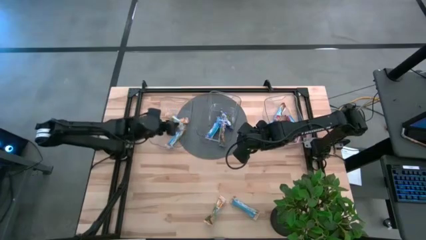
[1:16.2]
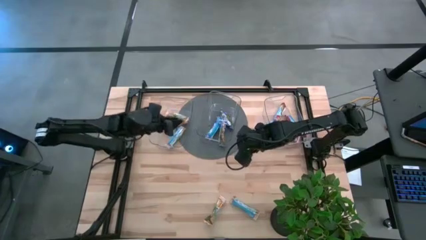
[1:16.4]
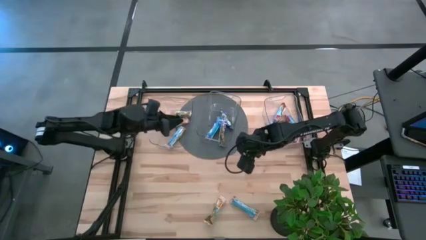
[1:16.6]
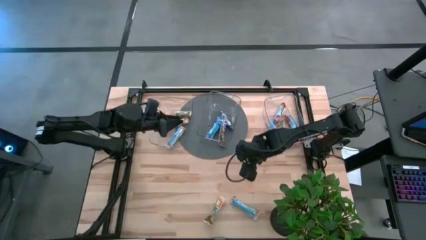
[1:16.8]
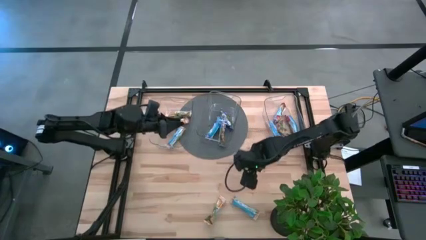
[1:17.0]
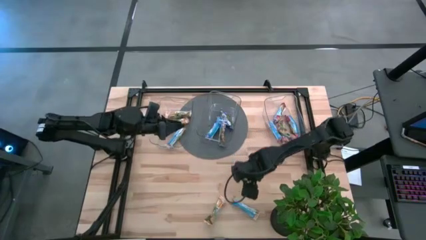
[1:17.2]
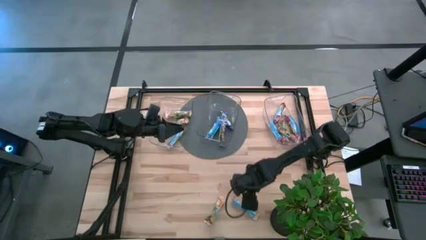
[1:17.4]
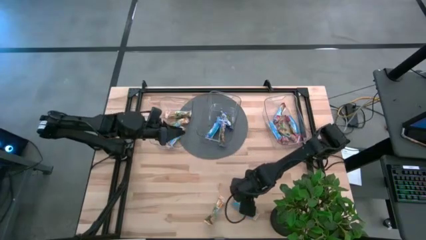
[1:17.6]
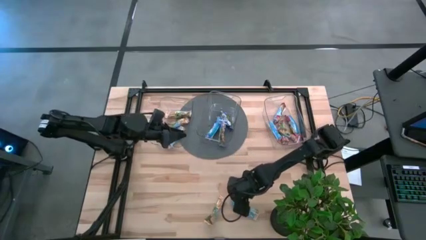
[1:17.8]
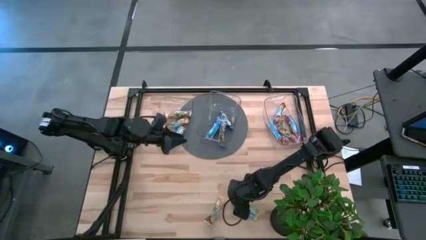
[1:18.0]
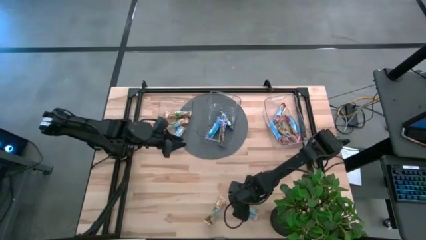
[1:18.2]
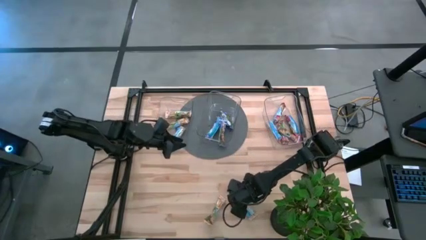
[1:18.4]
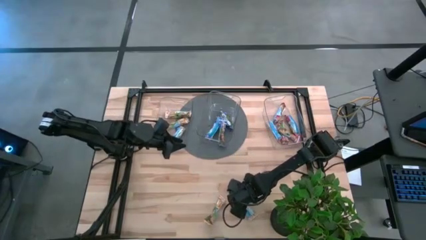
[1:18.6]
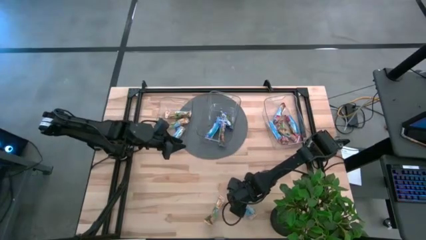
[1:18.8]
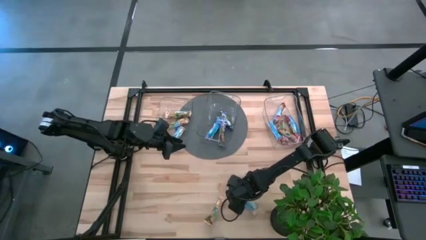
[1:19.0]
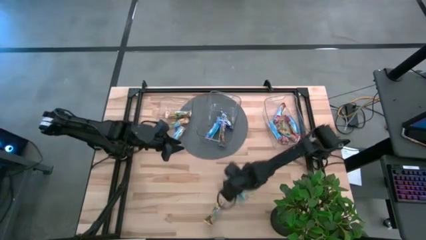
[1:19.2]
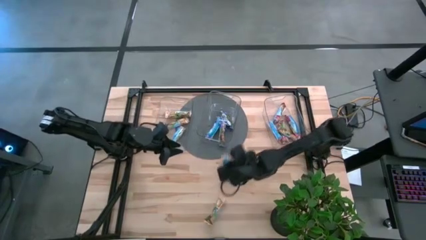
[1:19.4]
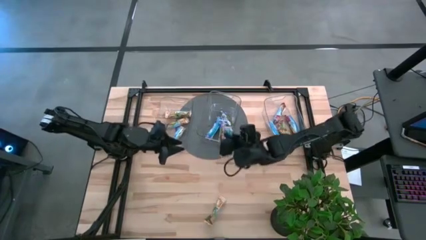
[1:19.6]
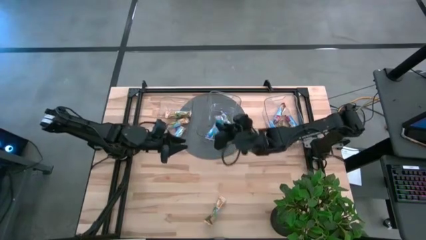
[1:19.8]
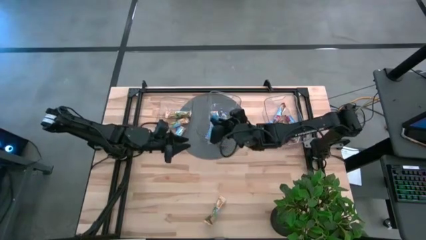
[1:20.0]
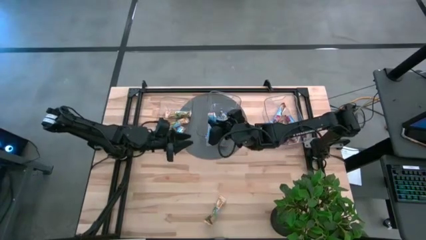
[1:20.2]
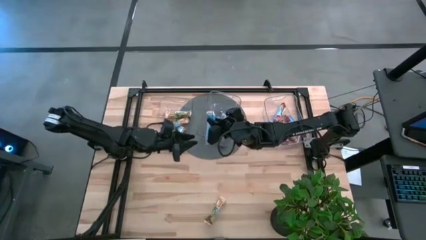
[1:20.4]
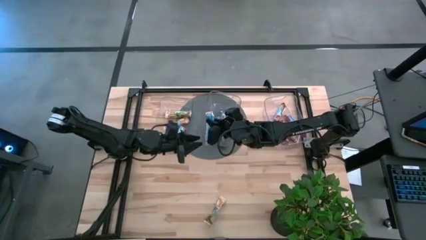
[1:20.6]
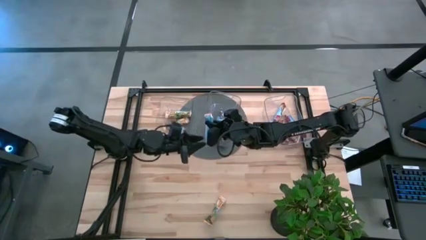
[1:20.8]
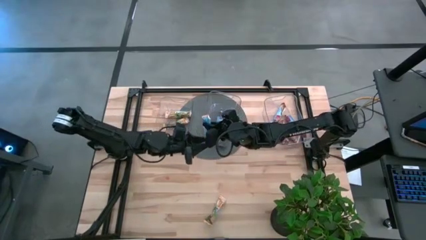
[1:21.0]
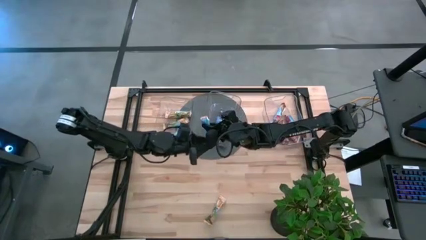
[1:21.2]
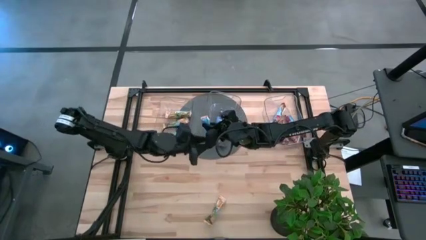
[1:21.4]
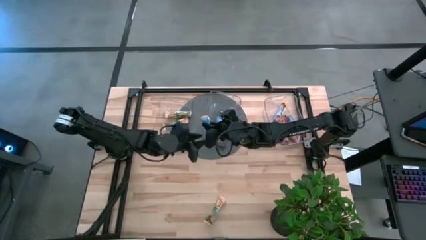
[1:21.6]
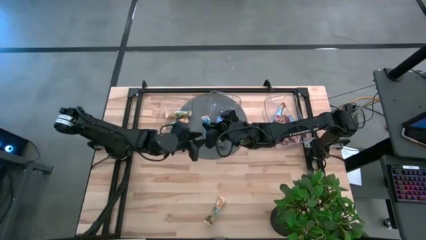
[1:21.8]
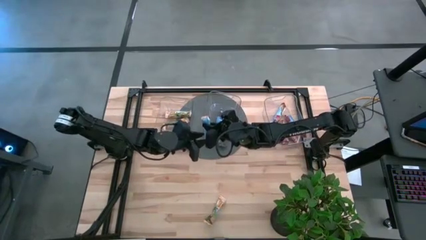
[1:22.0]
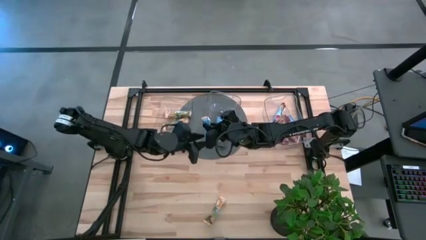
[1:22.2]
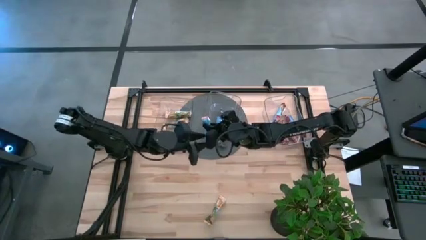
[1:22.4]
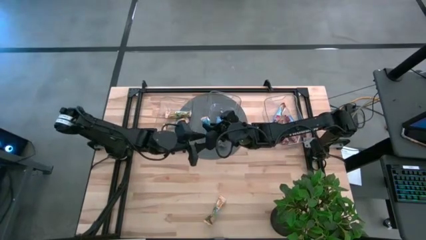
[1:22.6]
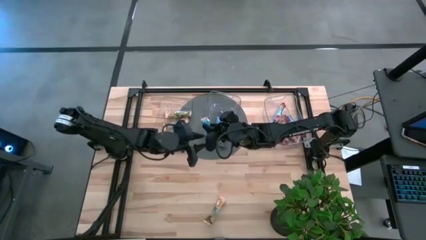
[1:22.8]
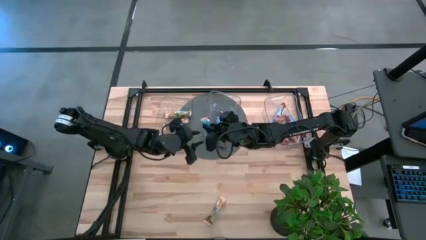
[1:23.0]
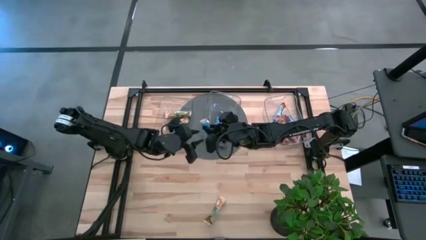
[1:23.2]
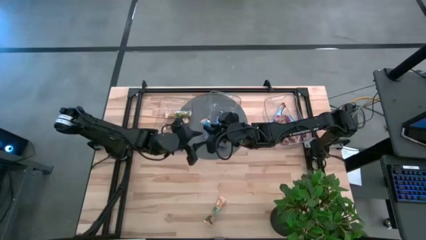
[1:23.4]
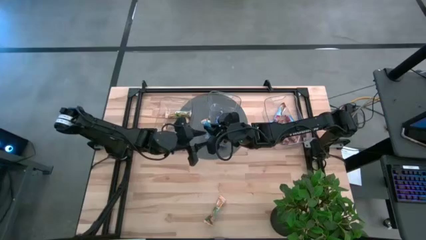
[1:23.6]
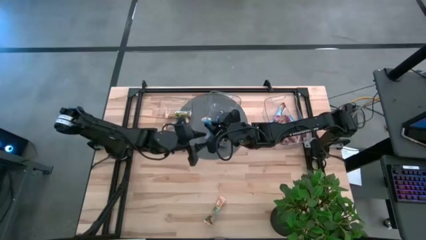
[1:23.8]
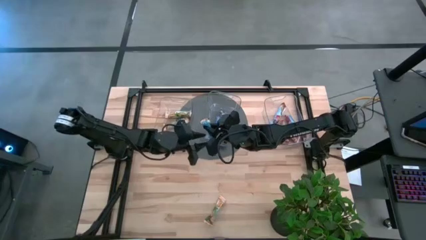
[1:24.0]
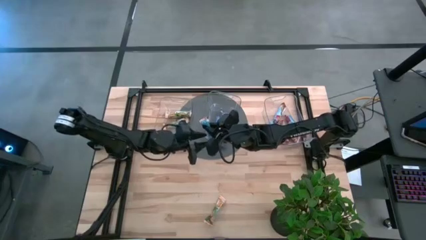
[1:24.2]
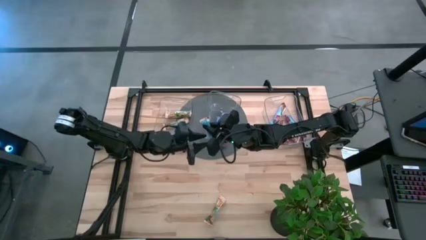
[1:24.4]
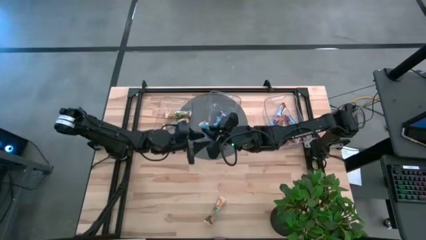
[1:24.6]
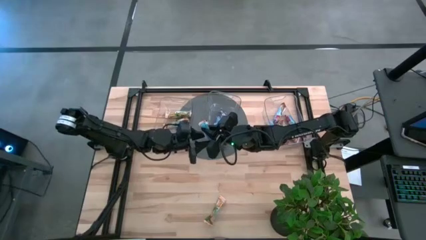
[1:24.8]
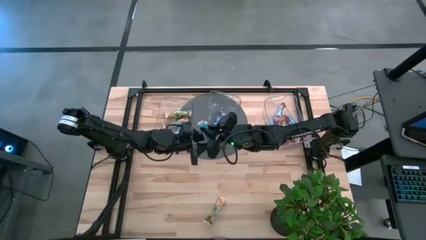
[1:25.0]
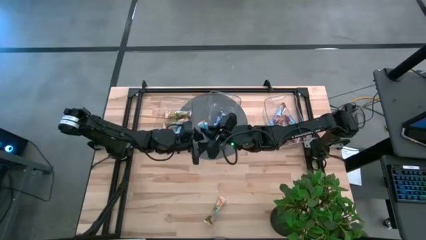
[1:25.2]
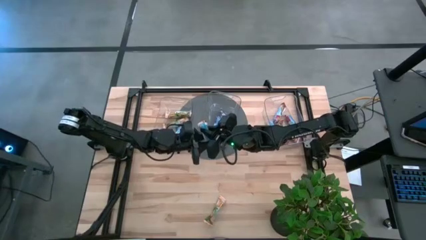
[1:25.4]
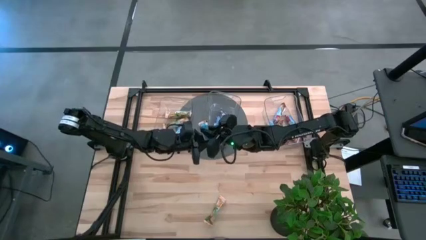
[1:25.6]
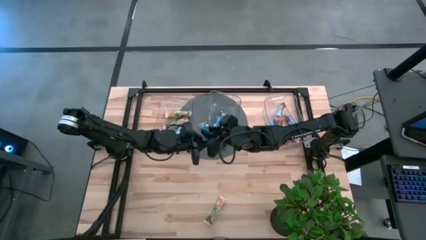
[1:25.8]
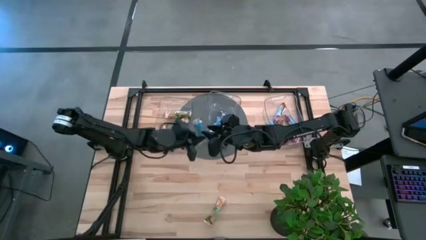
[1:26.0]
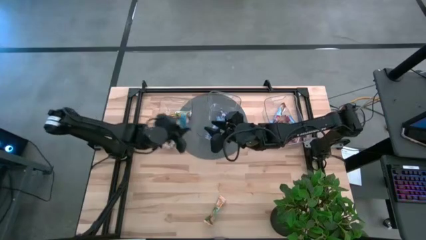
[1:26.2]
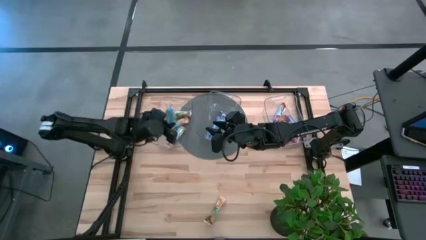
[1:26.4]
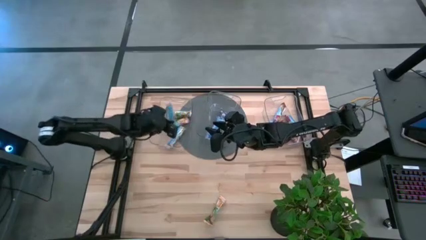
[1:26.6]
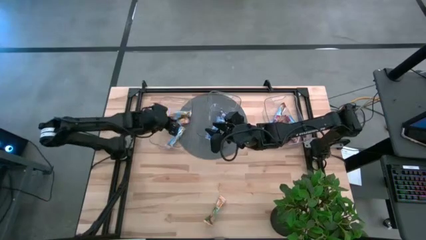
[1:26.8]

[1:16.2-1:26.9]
Task: Pick and place Granola Bars by type
Put the yellow granola bar into the left transparent bin

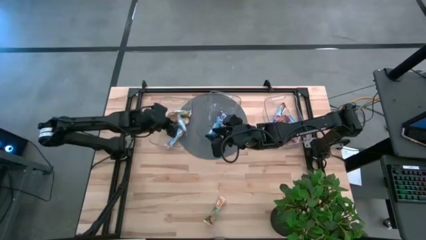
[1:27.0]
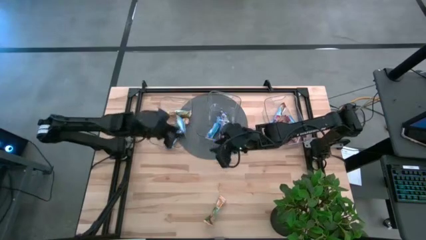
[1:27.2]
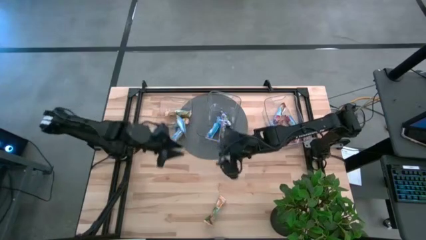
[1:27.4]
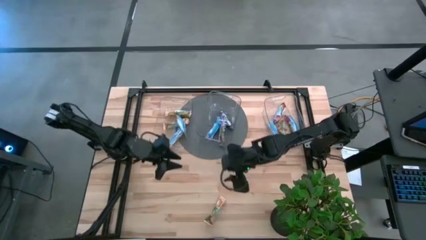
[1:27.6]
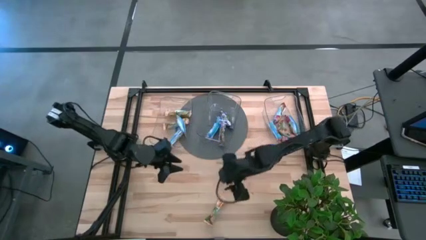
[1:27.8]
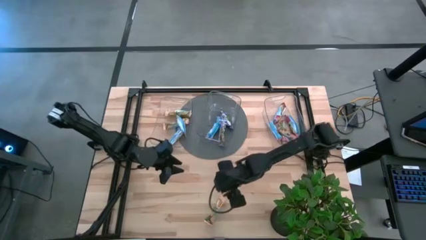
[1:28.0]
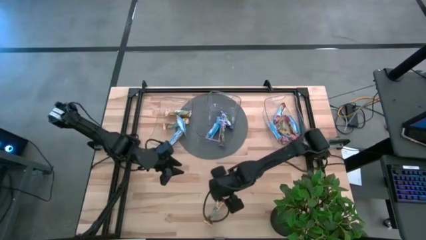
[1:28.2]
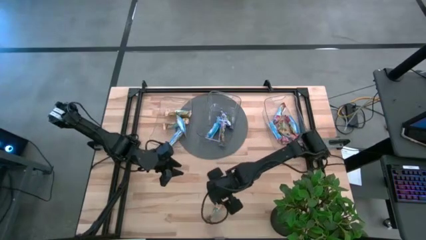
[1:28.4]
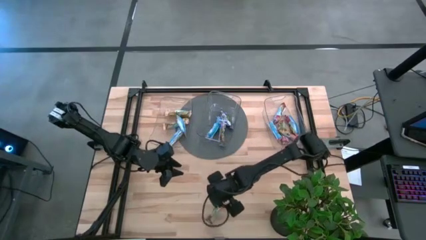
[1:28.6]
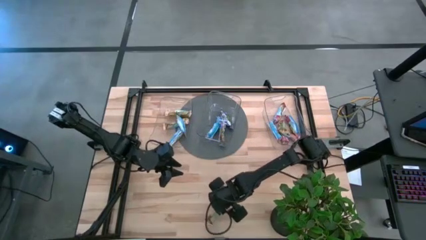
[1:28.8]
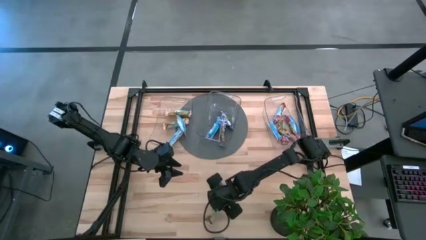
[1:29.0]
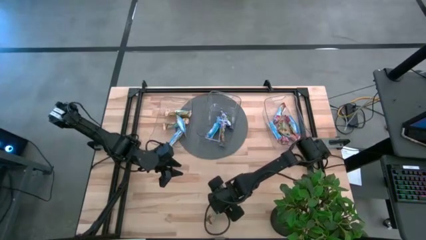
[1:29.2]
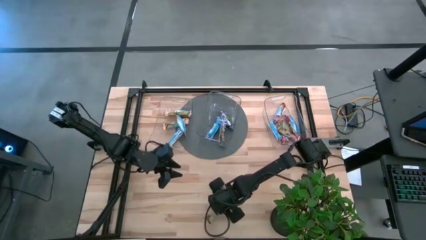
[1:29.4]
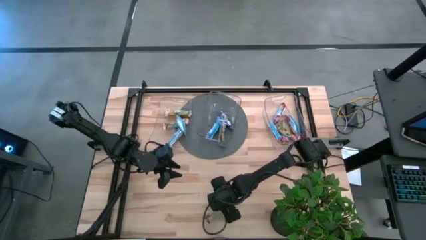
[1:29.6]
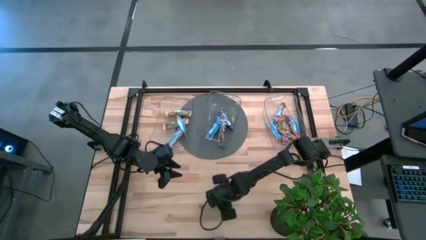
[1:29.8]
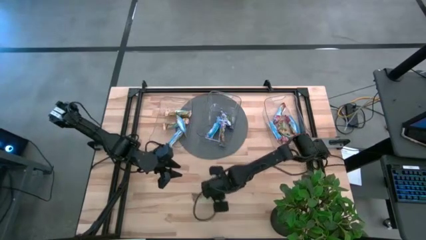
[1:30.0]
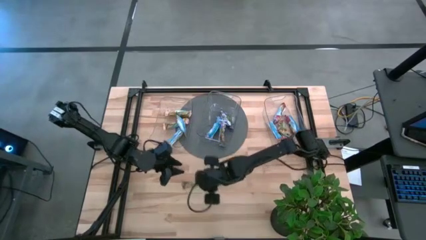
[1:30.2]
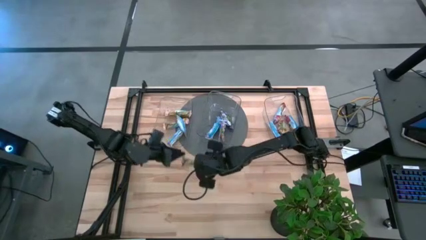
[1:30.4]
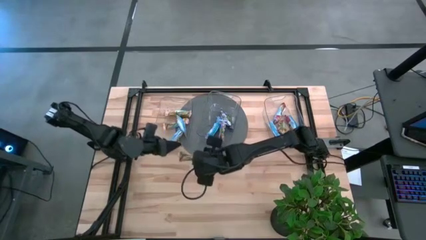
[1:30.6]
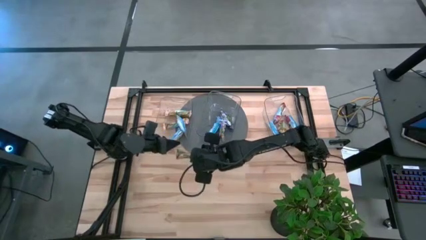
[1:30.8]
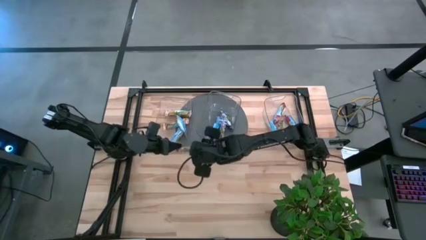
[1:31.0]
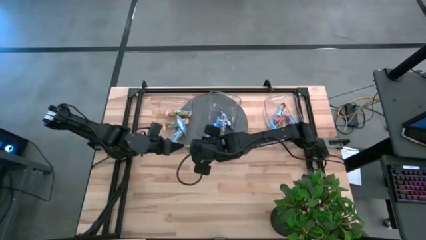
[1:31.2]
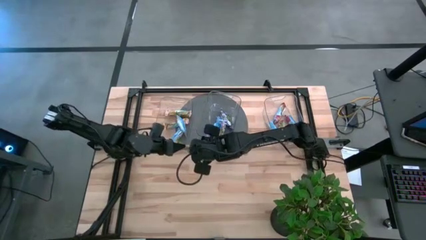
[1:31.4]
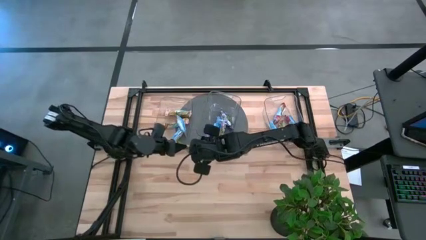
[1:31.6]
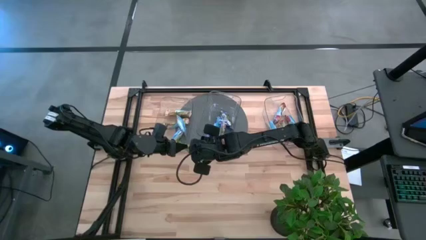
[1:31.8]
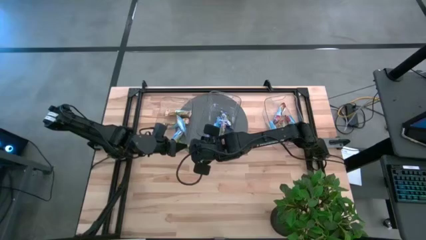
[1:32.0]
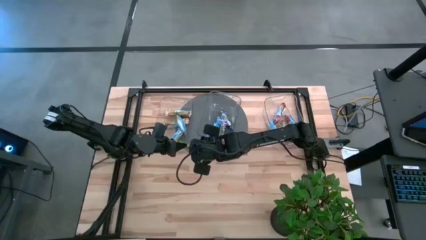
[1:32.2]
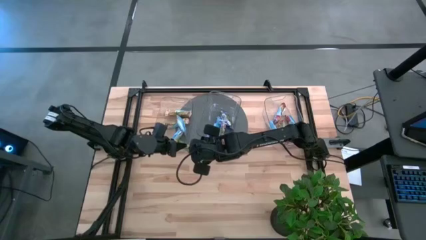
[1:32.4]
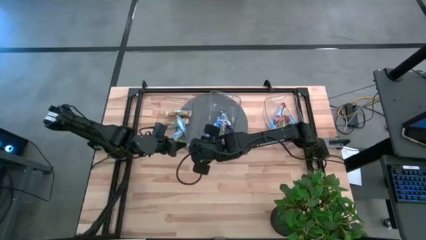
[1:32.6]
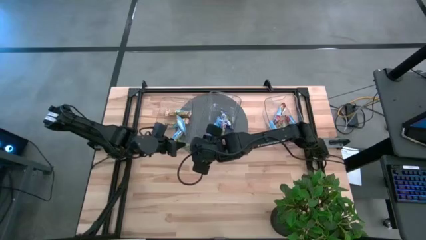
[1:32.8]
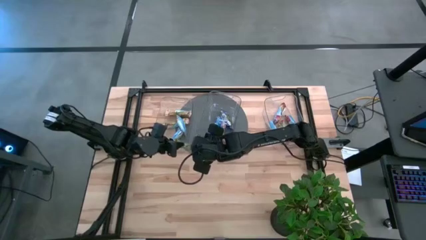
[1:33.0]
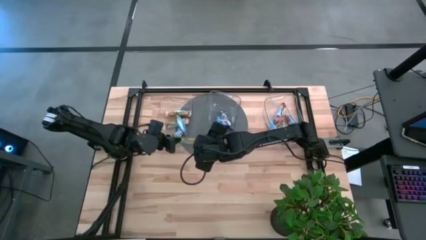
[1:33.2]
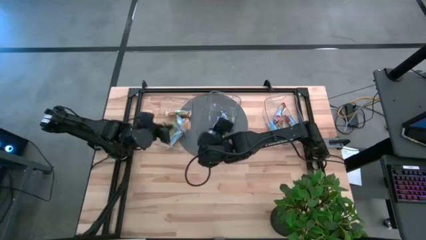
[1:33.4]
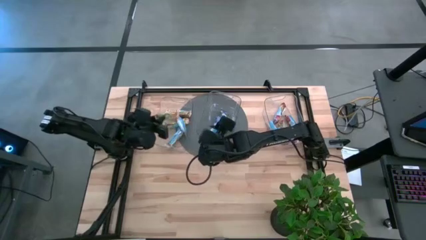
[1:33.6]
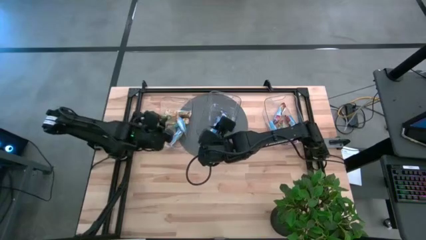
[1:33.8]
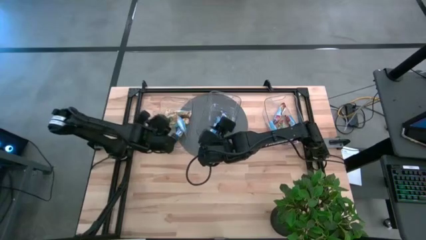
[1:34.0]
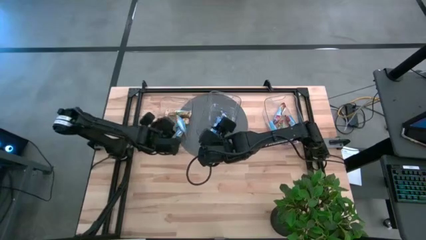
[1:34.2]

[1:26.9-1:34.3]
Put the yellow granola bar into the left transparent bin
